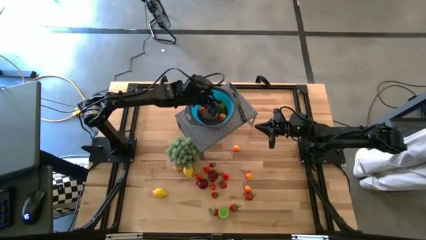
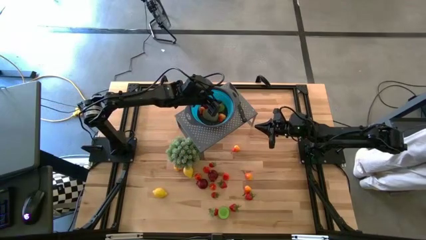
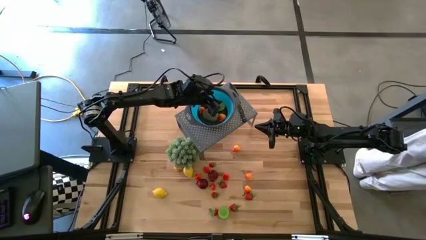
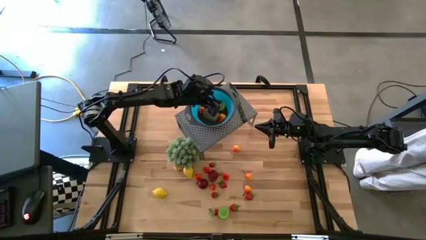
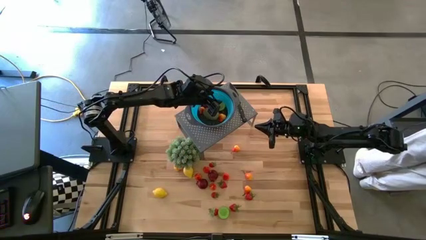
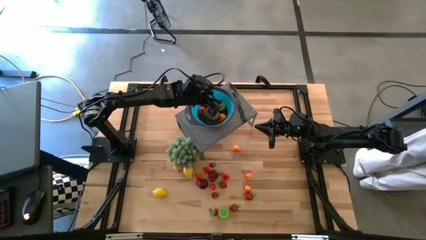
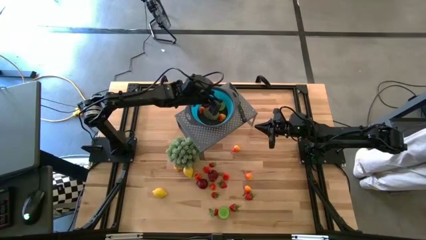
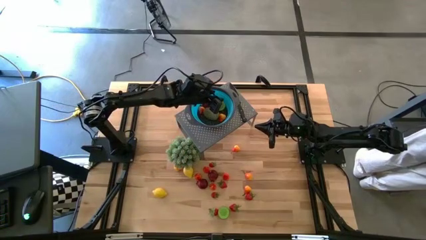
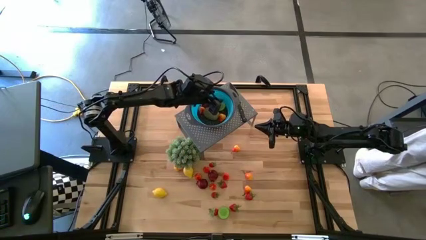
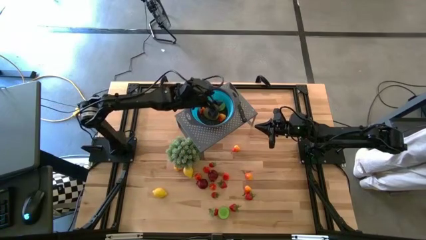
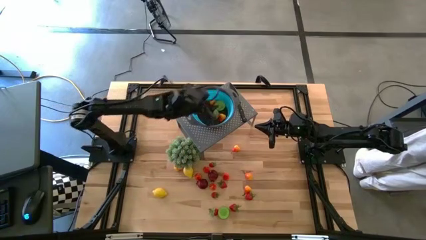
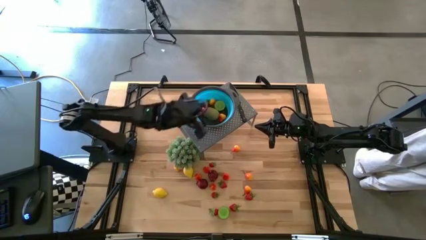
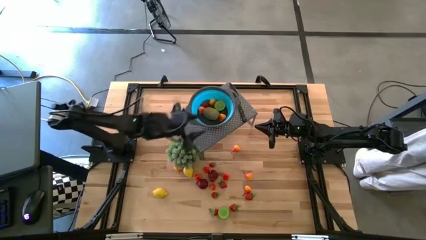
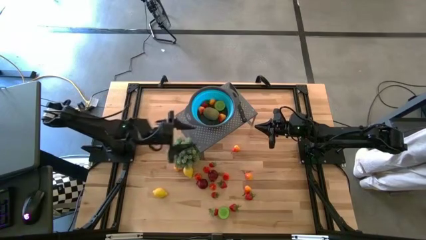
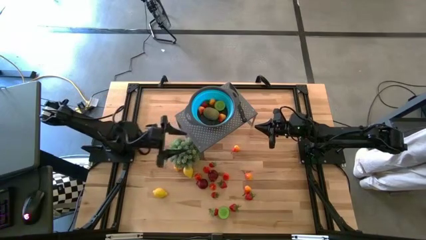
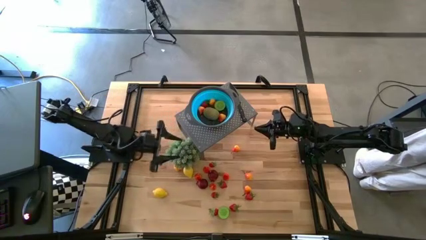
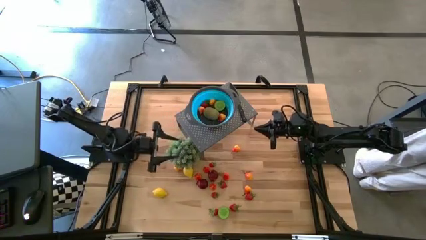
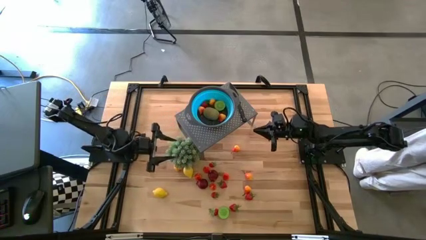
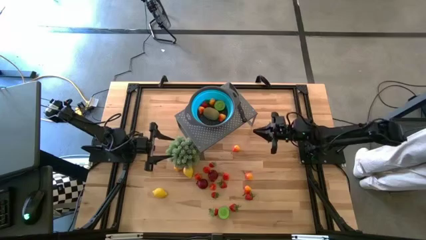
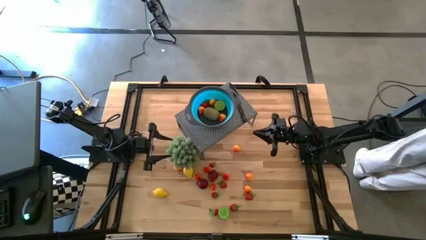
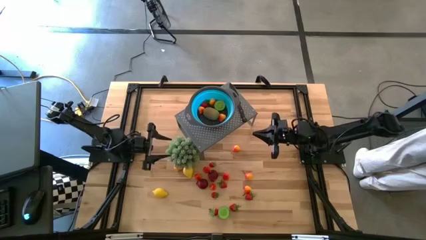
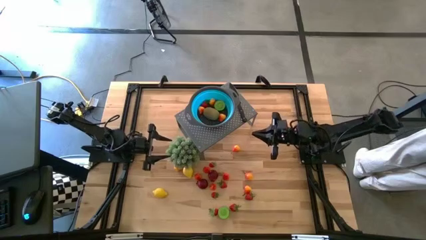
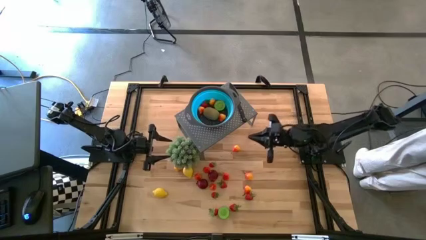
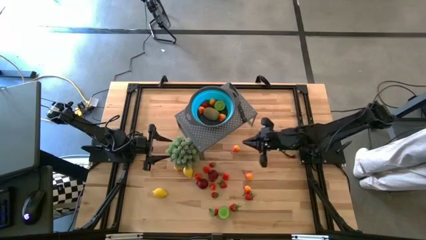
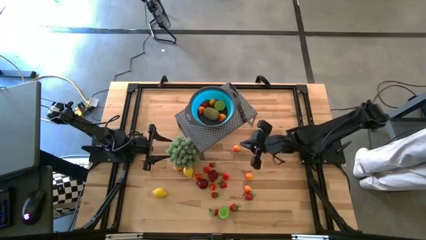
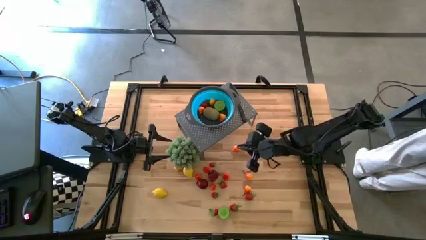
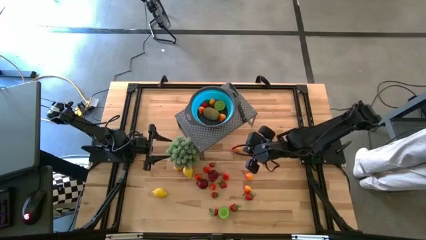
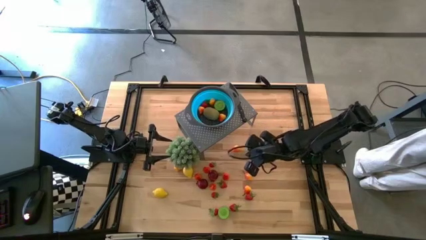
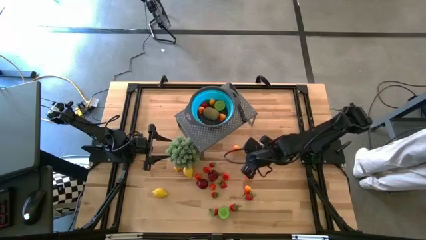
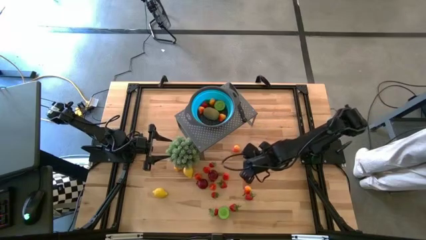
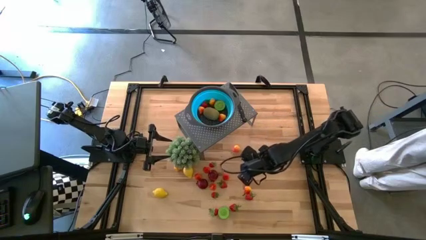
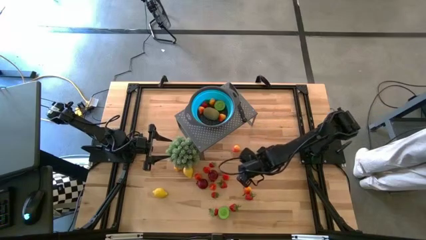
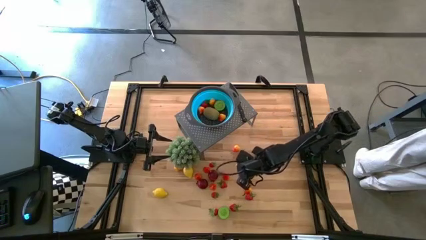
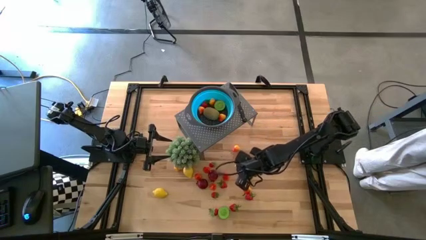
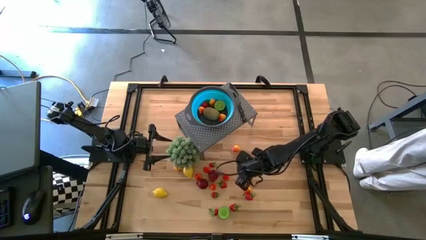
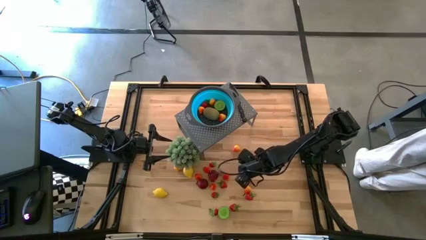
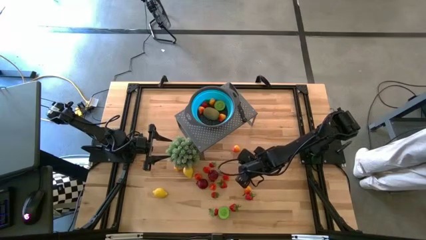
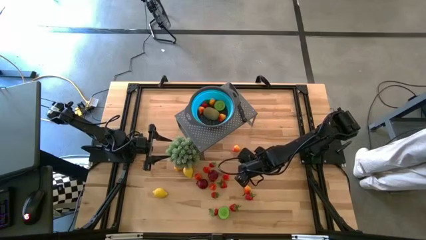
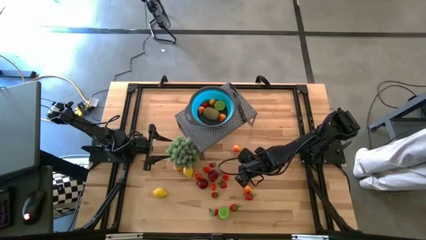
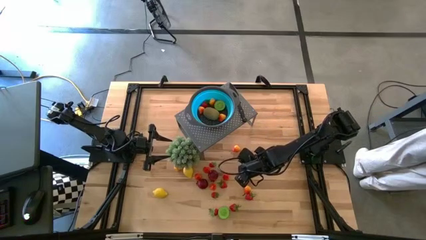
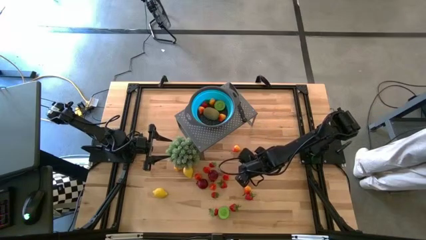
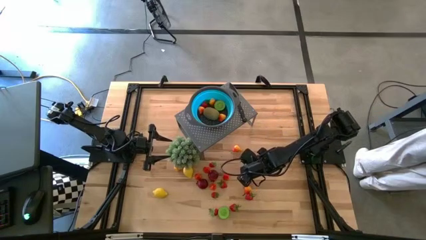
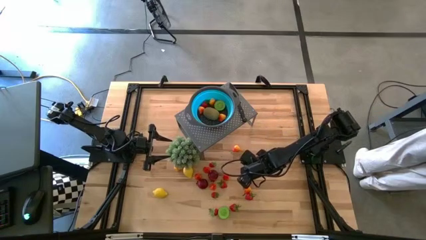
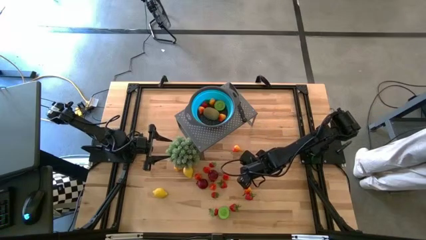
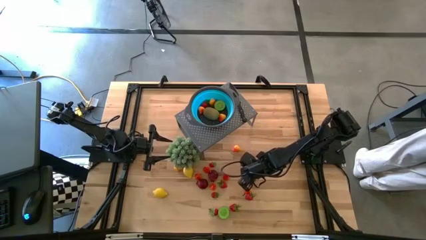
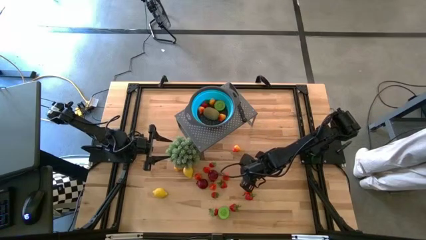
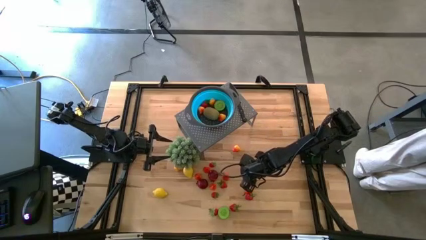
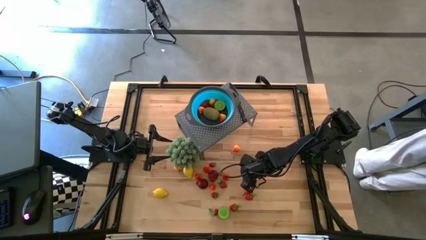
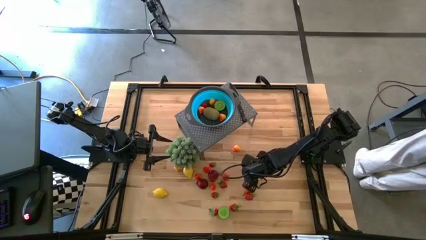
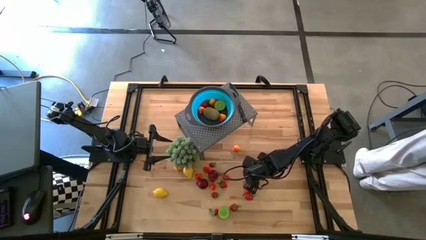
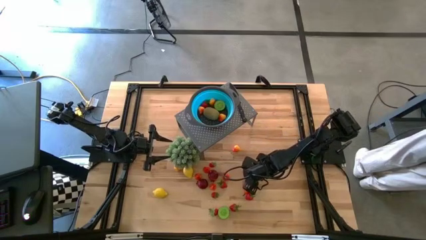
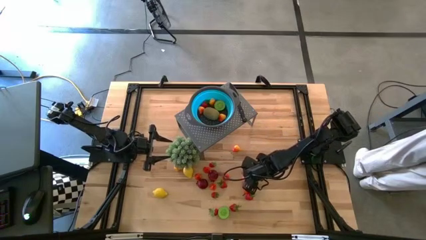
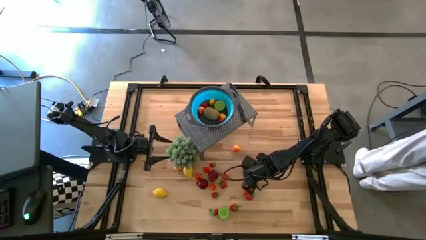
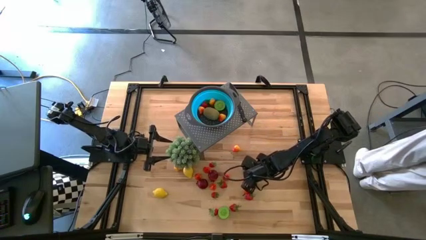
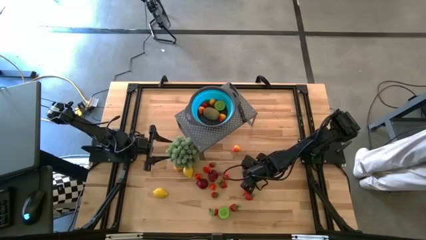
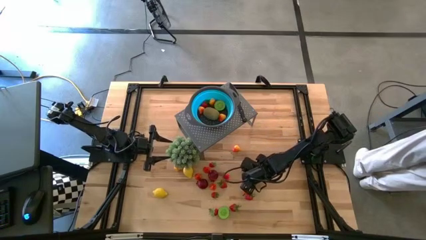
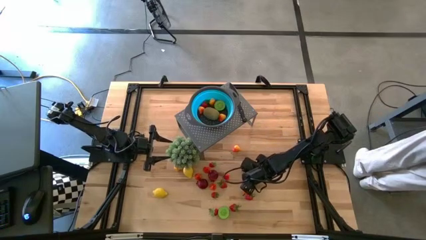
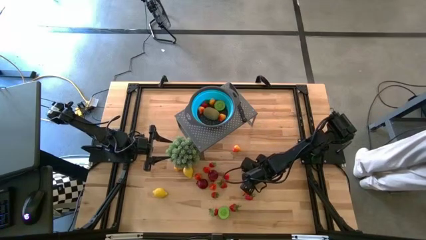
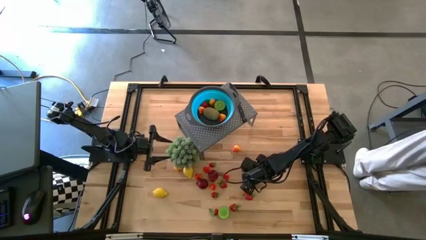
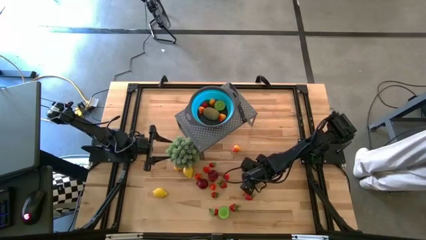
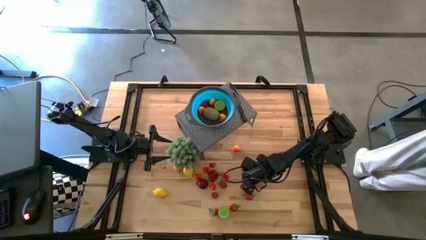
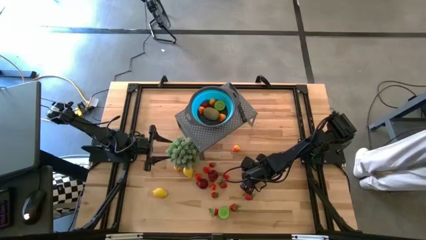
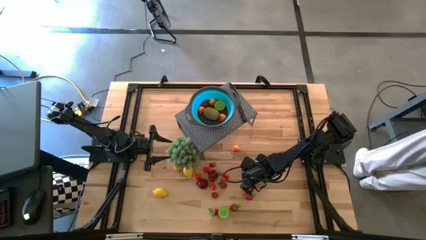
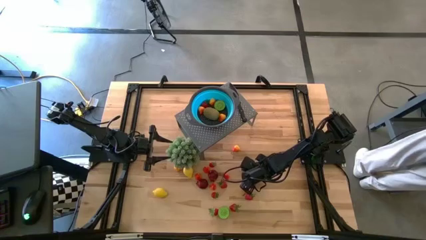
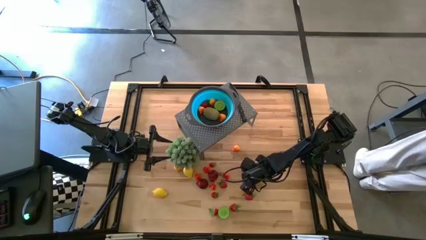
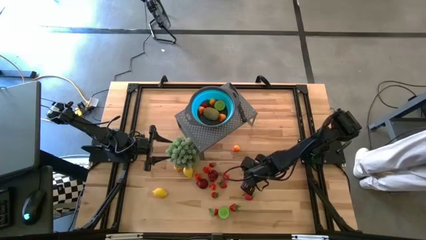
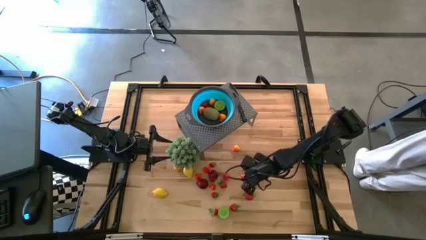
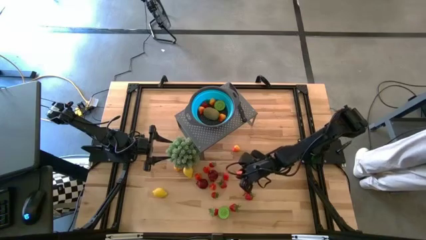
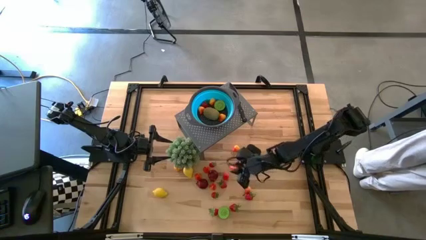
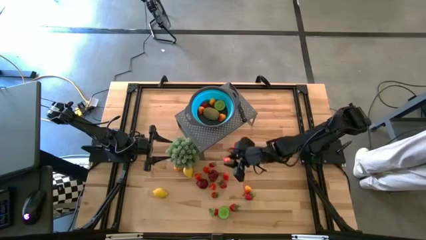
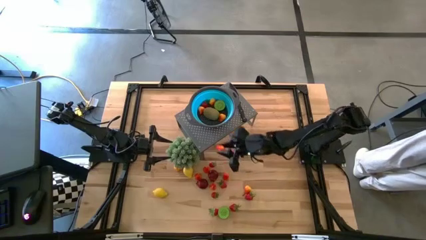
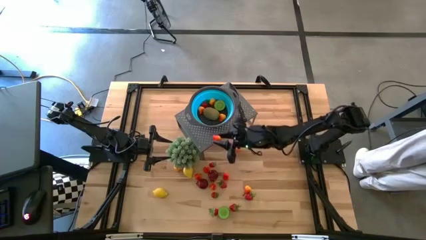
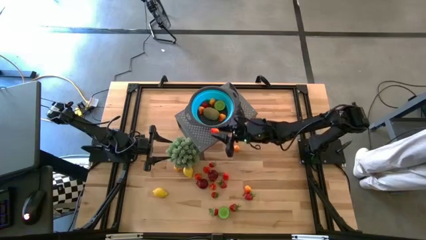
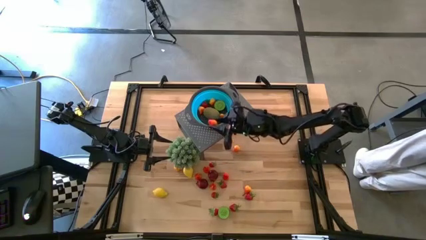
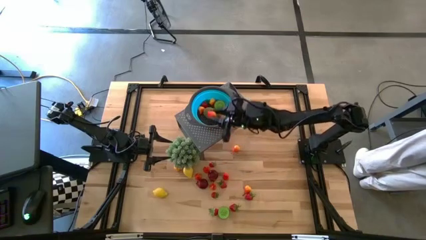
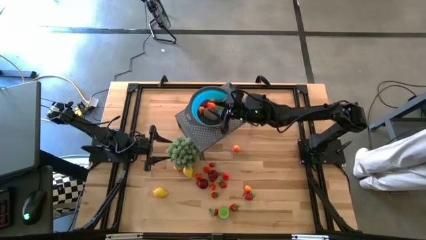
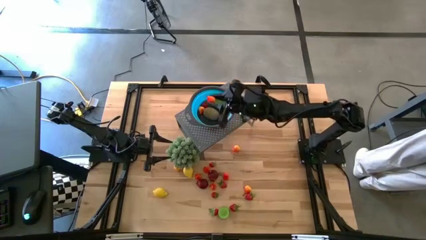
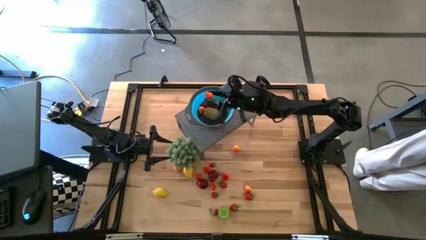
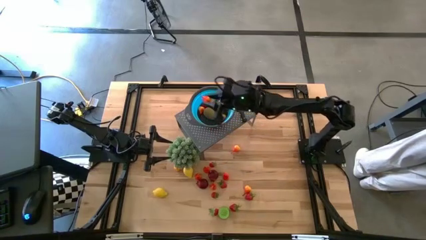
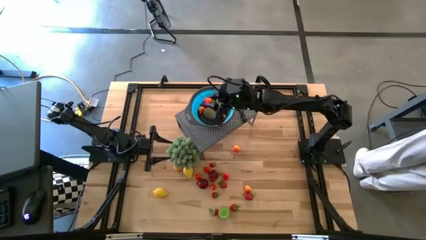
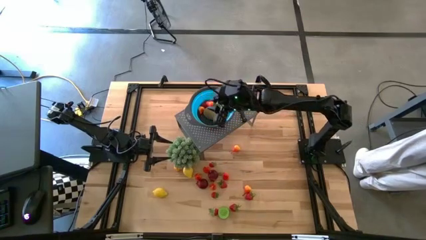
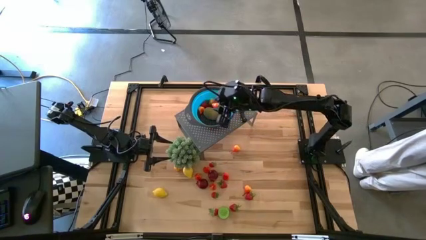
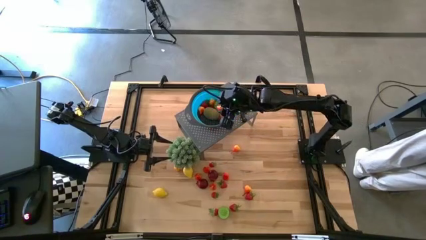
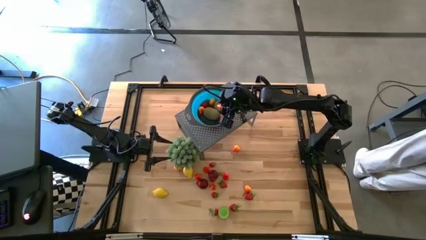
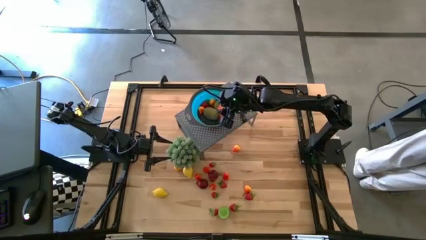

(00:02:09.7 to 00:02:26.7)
Task: Pick & Place Fruit
Put the pear into the blue strainer bowl on the shelf
